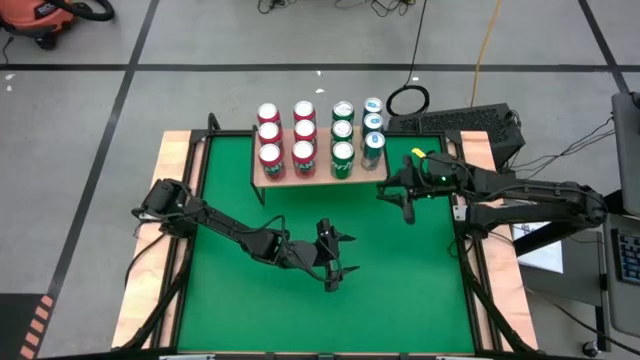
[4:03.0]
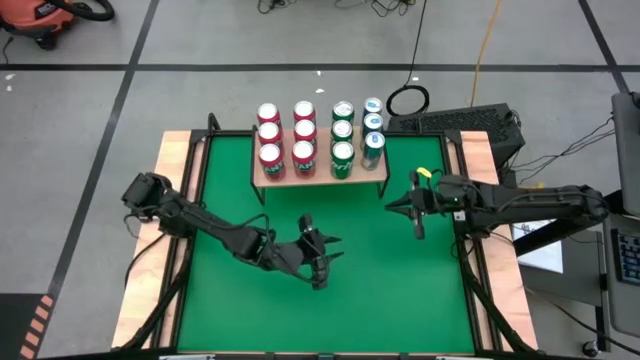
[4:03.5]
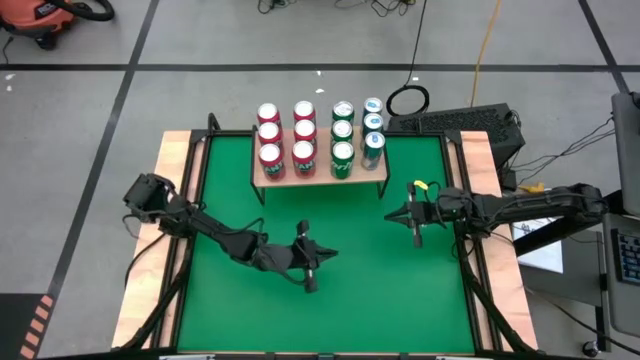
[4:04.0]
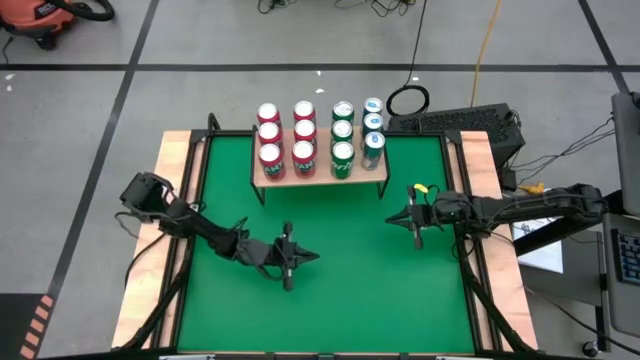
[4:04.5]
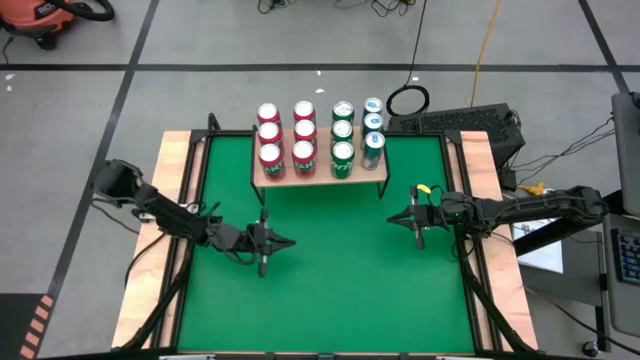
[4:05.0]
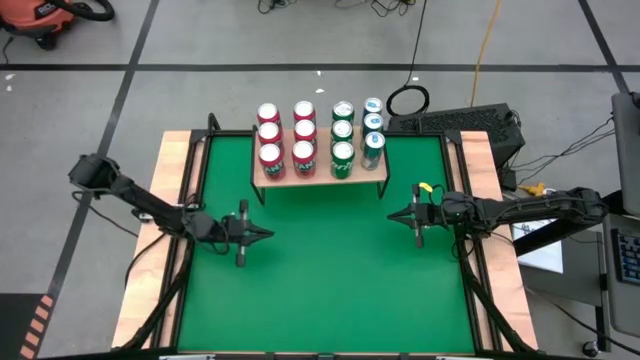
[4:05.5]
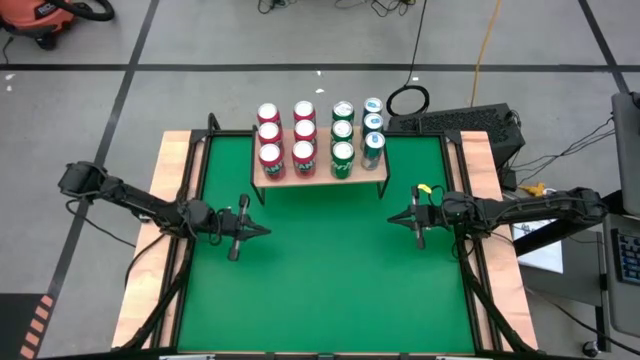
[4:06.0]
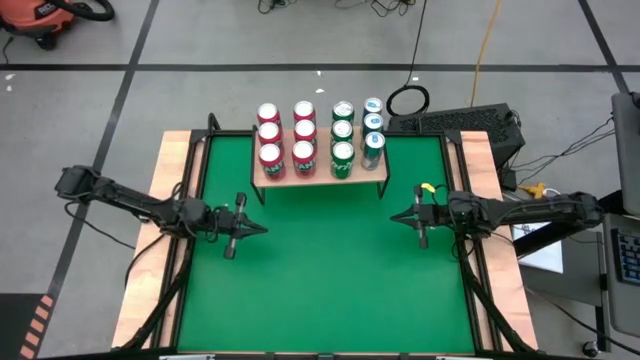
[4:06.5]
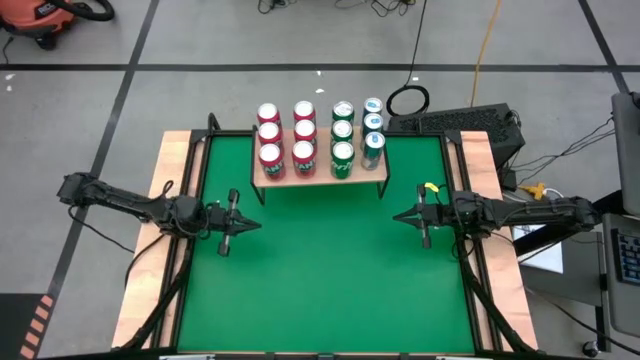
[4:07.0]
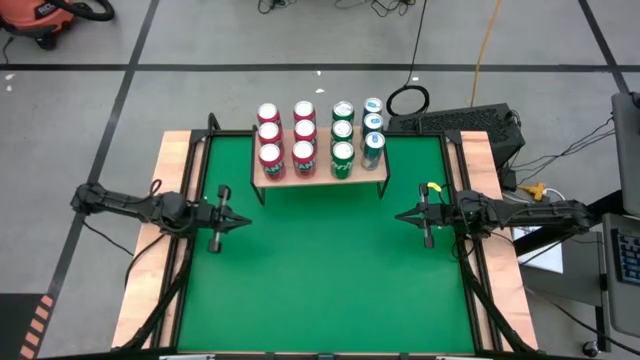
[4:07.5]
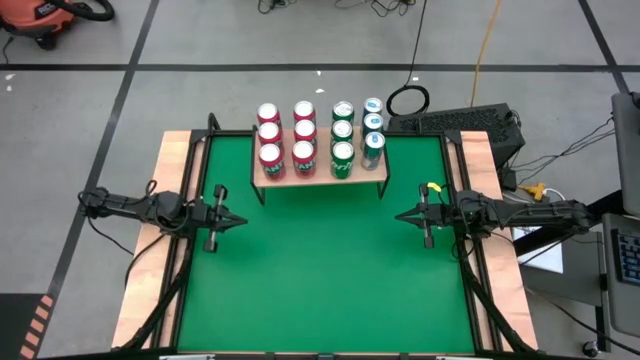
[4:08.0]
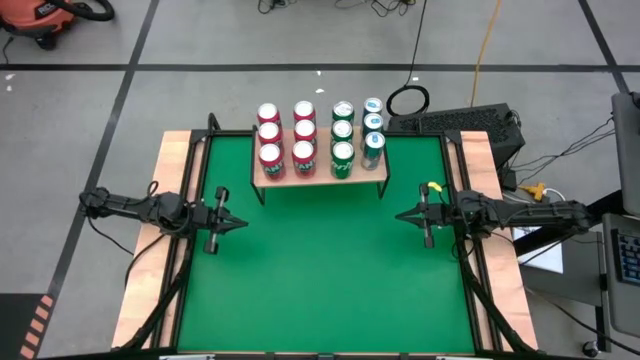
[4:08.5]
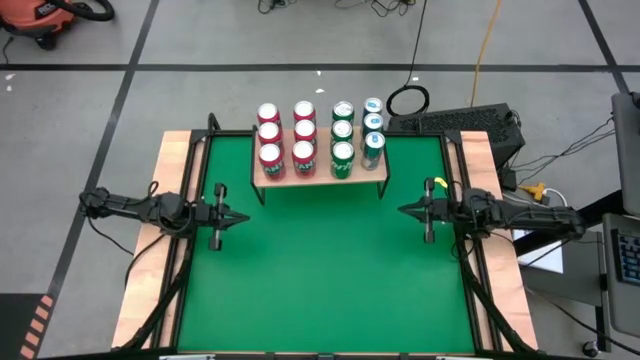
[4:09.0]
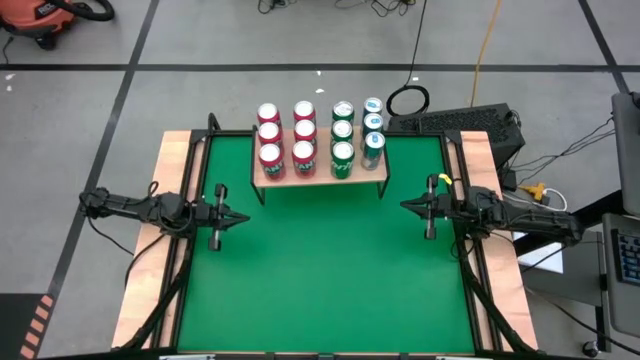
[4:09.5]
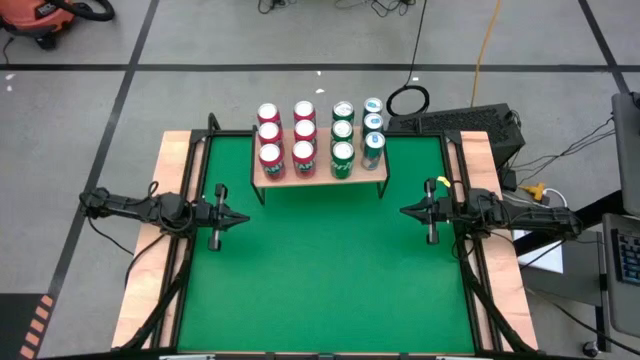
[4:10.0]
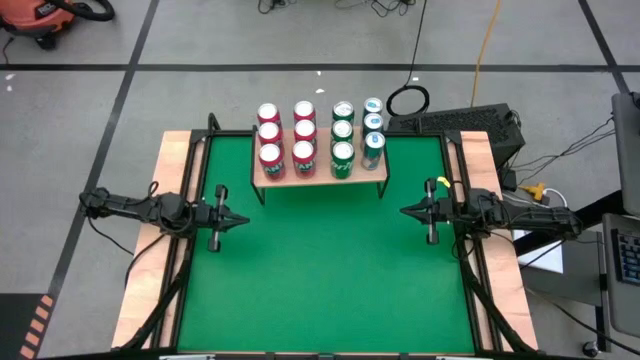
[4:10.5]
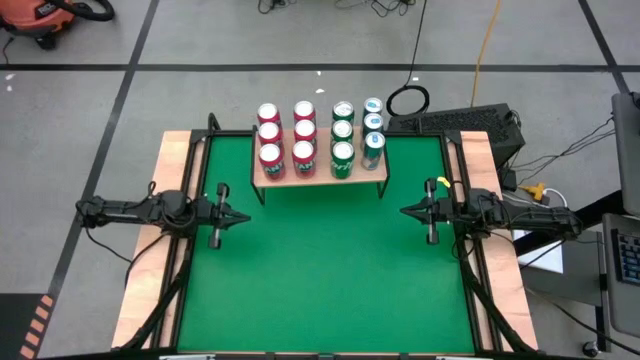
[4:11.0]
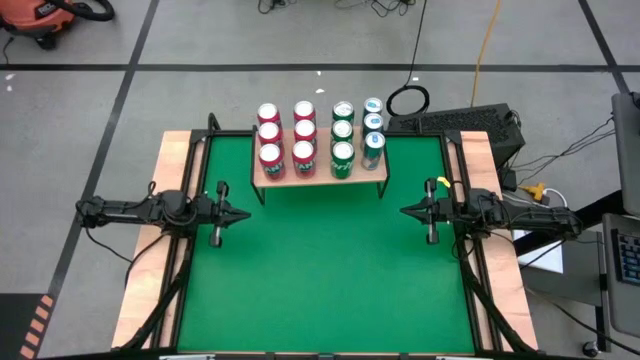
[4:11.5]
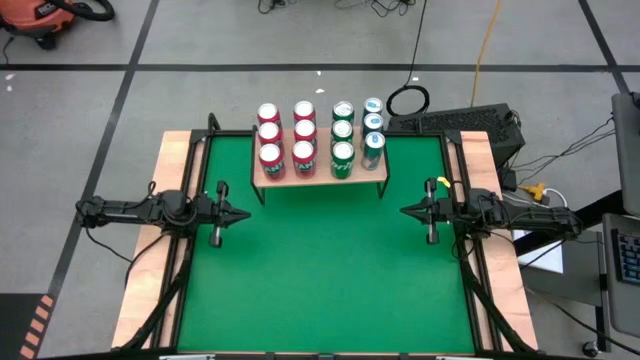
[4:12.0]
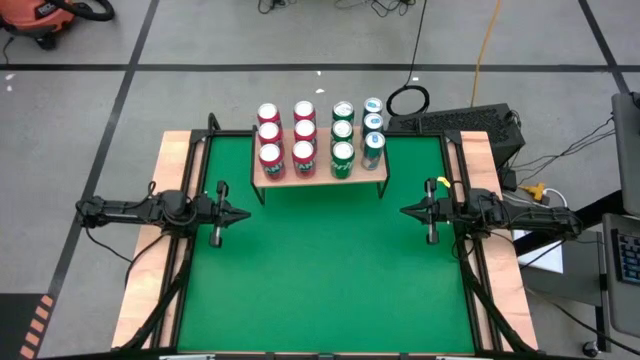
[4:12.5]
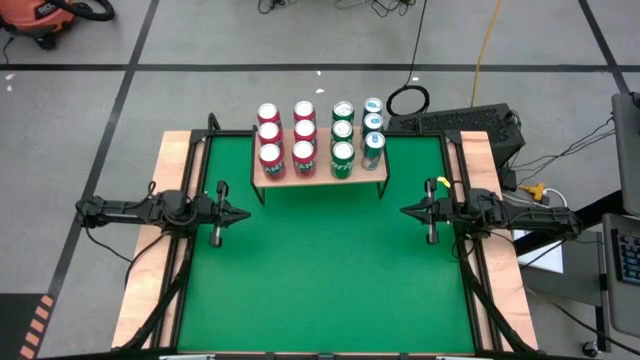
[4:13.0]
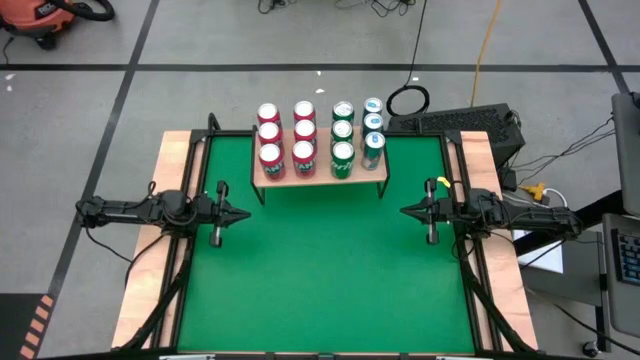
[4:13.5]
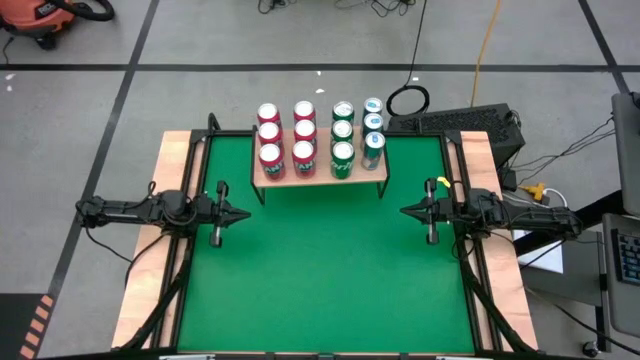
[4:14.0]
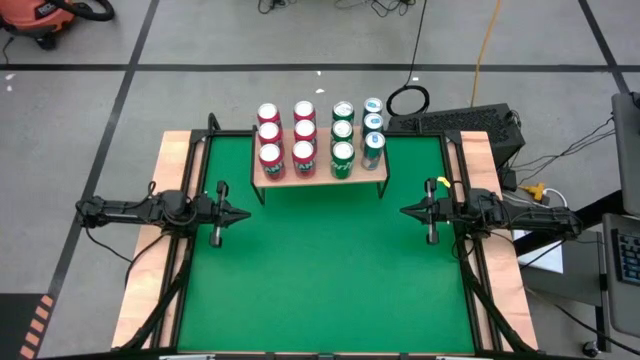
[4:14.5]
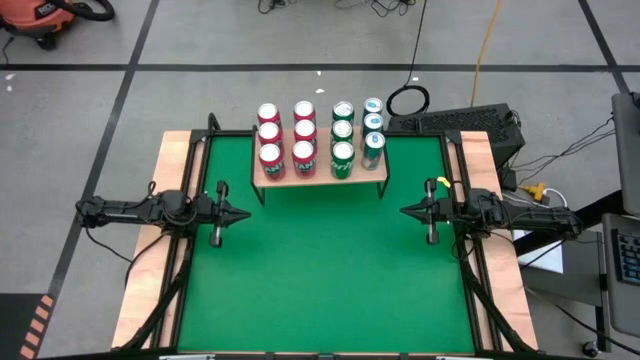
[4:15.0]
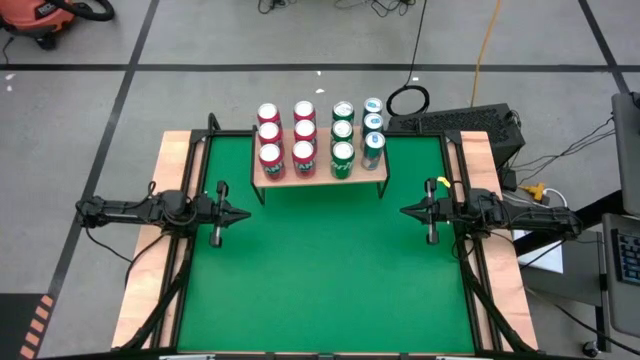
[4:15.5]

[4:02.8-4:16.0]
Task: Place canned beverage on shelf
Return to Home Position

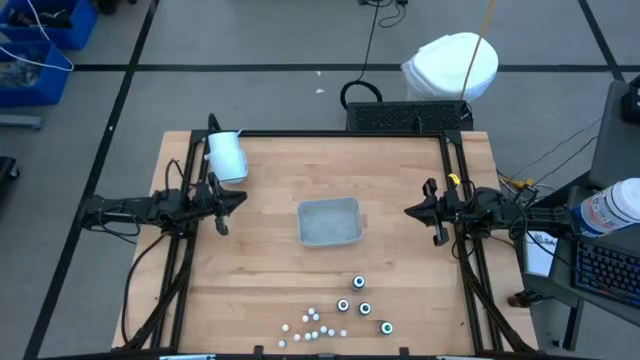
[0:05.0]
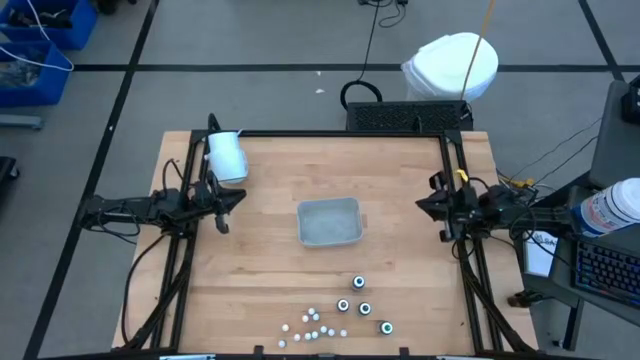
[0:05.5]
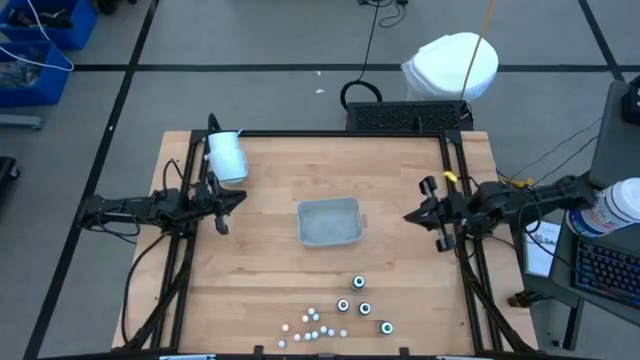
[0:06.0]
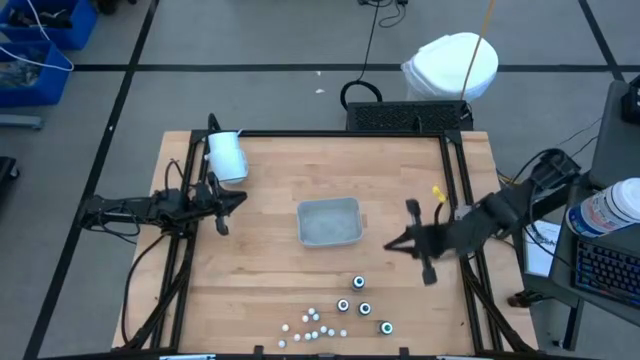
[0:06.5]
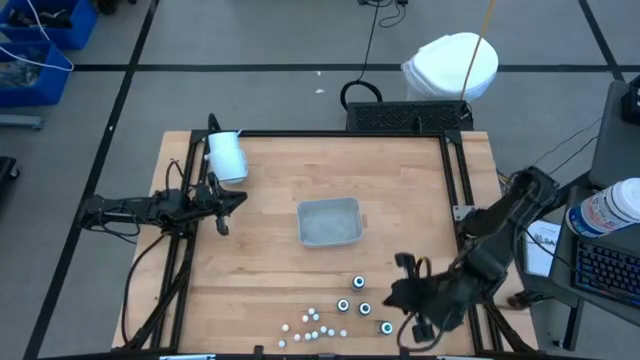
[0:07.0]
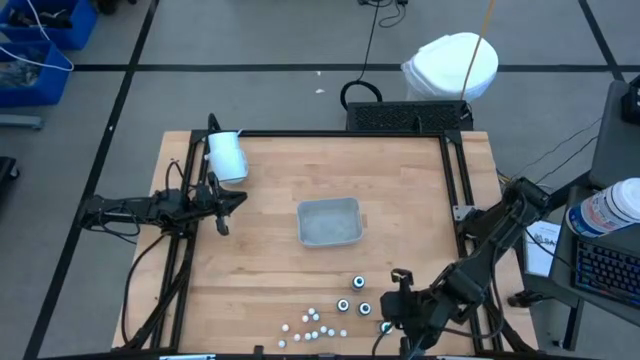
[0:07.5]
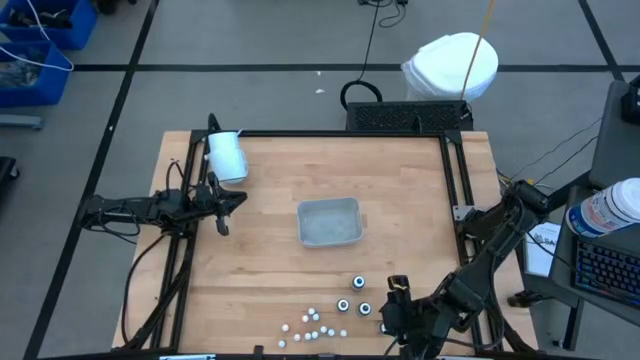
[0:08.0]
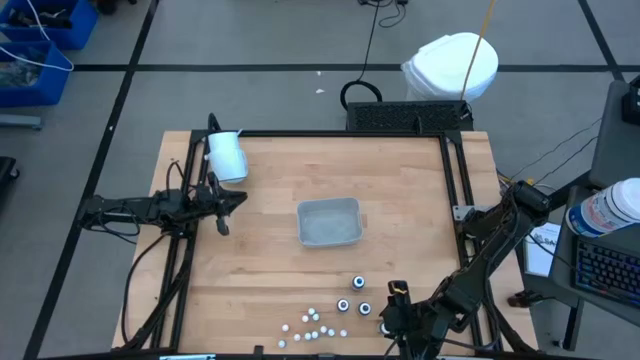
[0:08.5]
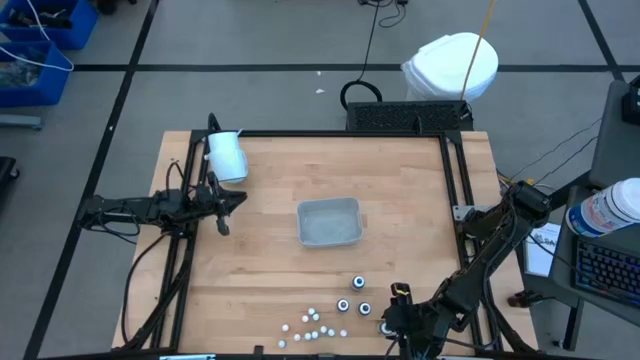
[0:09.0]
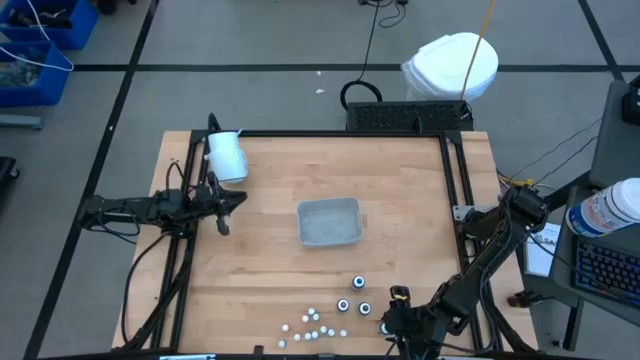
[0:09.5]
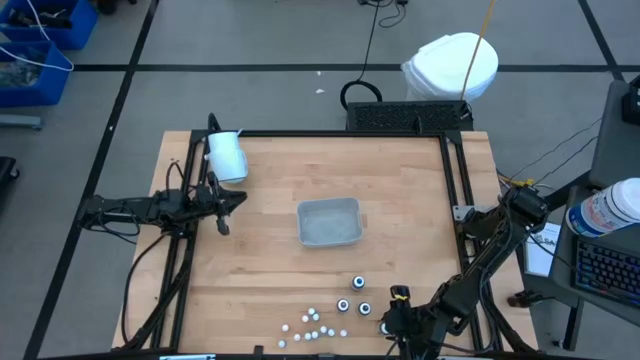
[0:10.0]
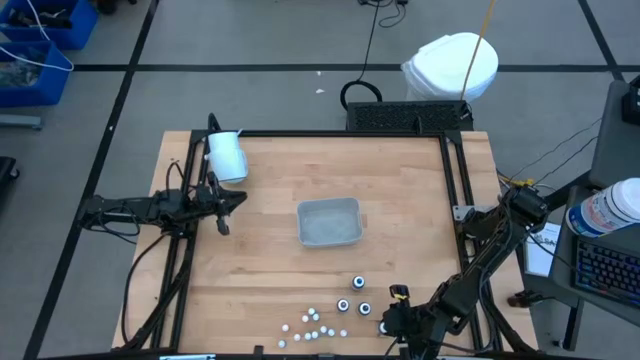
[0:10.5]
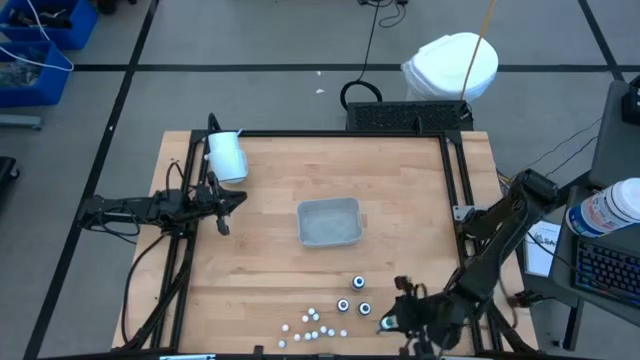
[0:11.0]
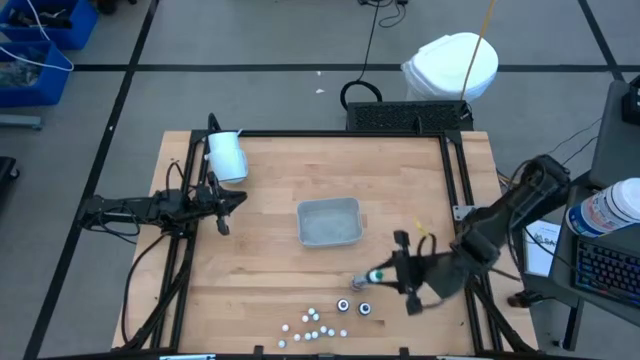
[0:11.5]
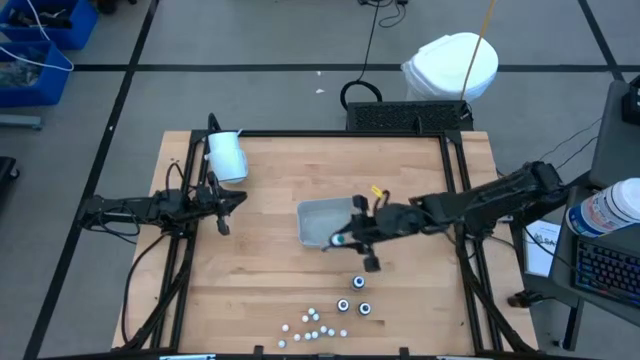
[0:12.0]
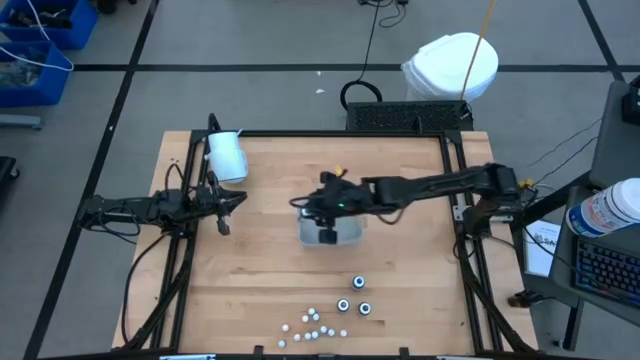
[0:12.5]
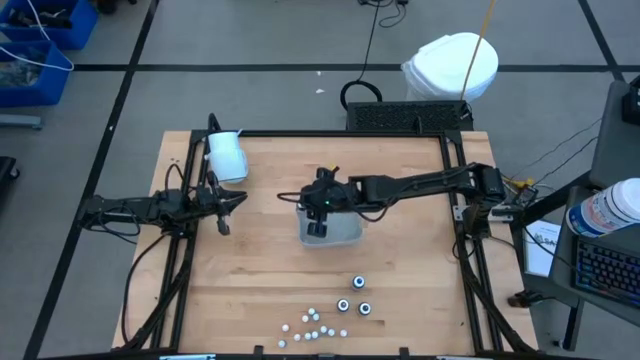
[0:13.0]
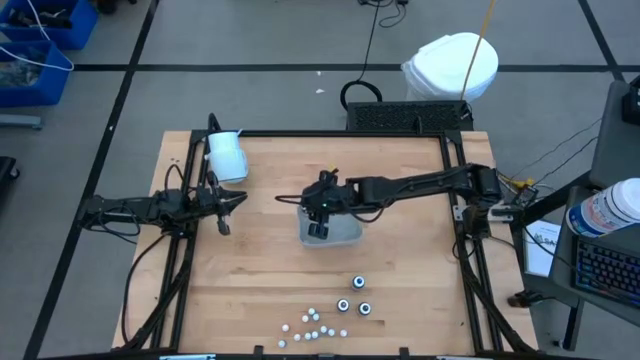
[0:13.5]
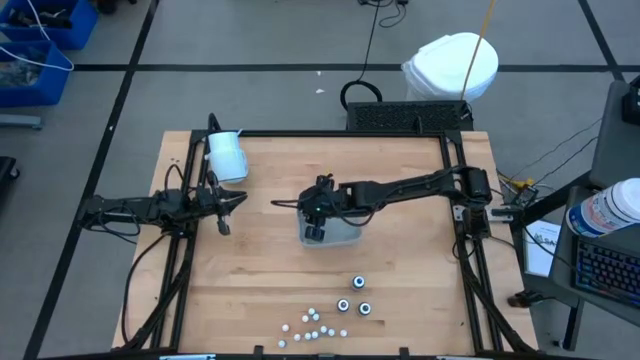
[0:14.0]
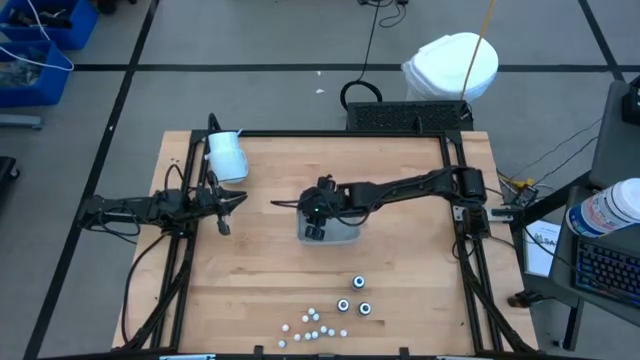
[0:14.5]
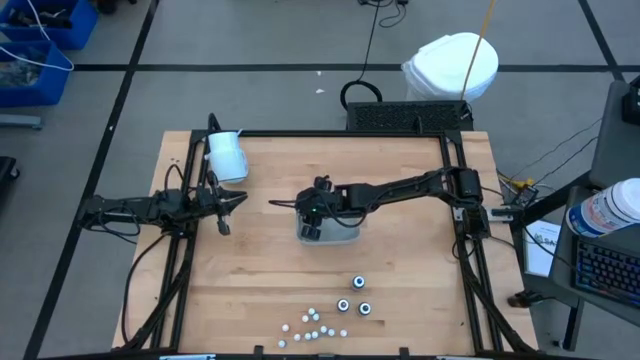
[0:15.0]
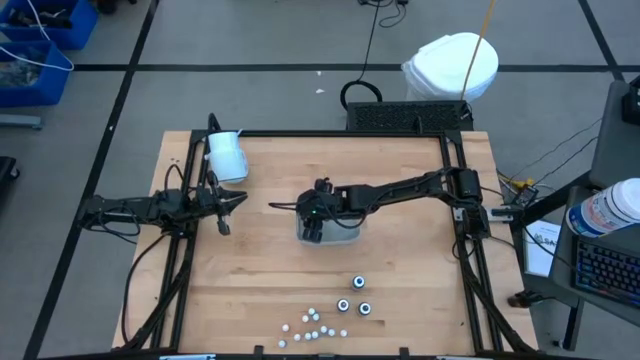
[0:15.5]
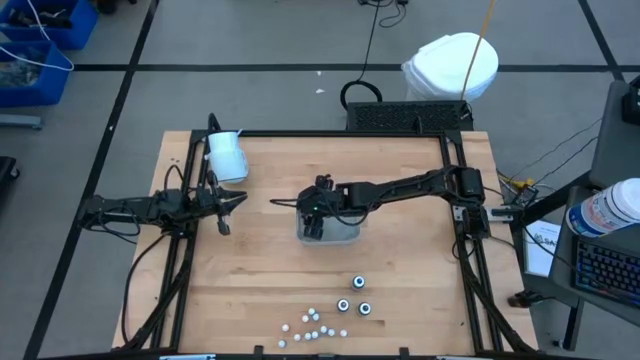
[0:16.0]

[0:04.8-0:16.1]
Task: Pick & Place food coloring
Put the large green food coloring bottle into the gray bin
